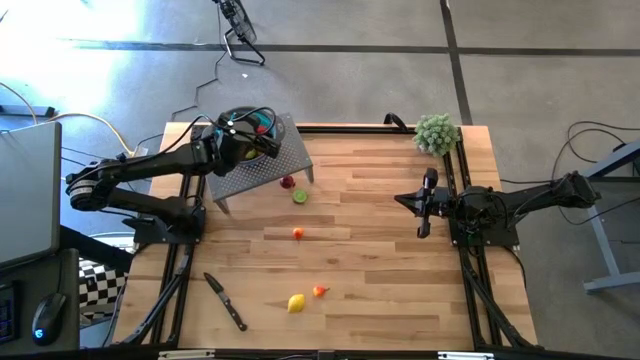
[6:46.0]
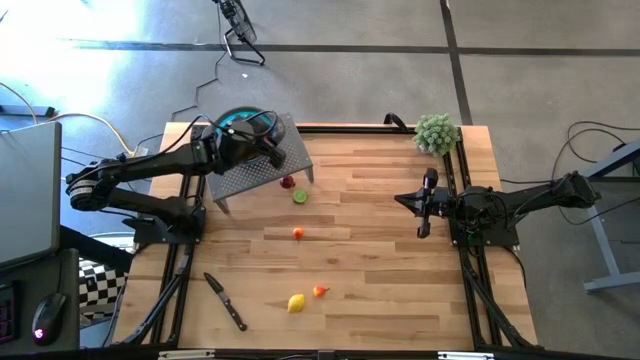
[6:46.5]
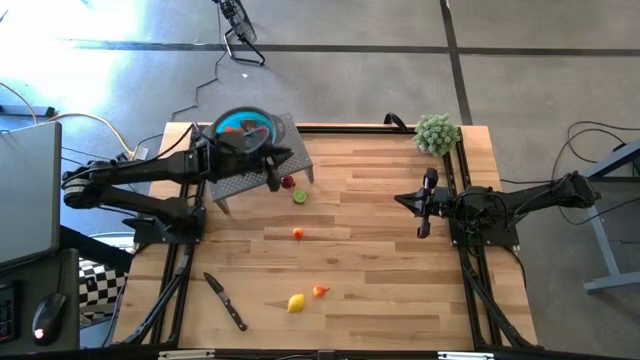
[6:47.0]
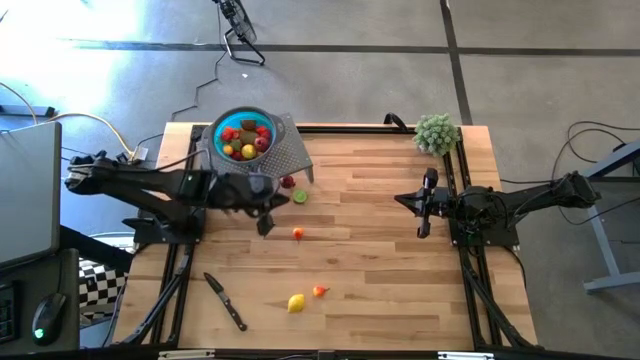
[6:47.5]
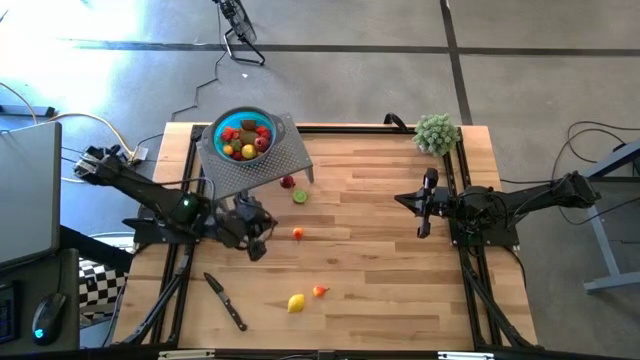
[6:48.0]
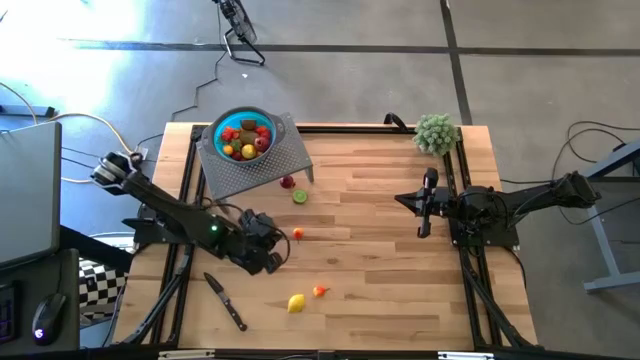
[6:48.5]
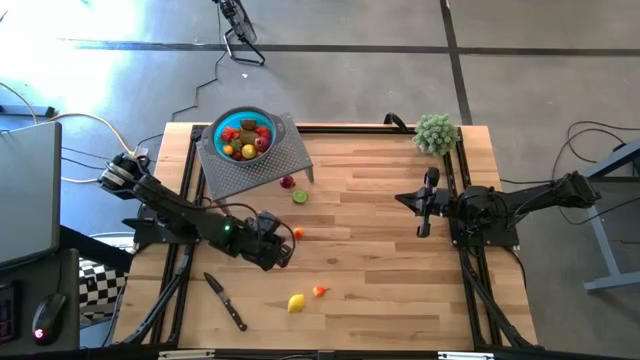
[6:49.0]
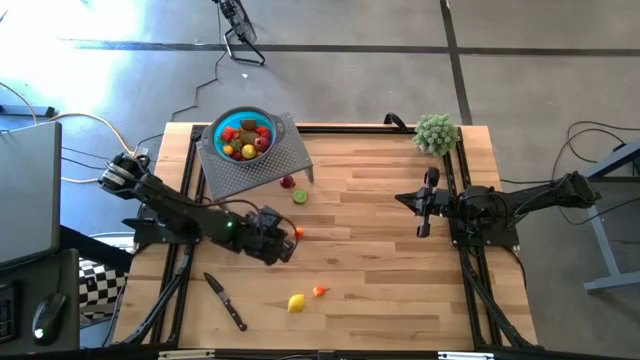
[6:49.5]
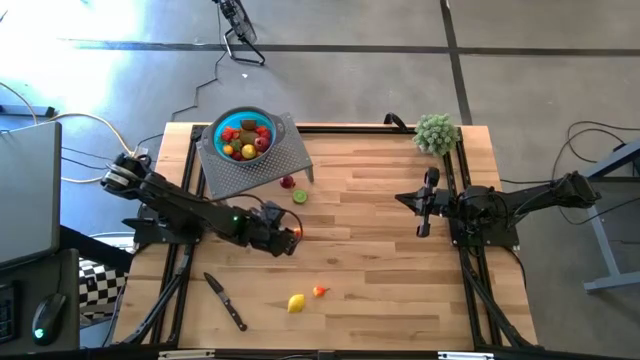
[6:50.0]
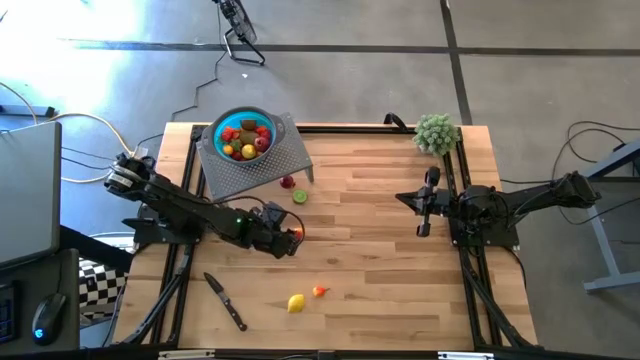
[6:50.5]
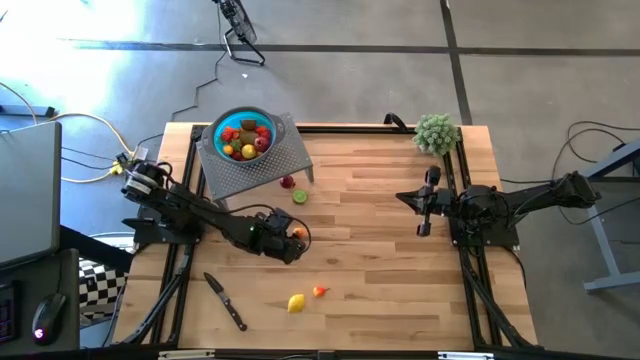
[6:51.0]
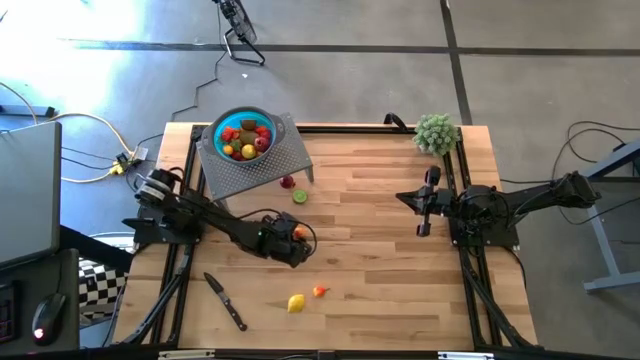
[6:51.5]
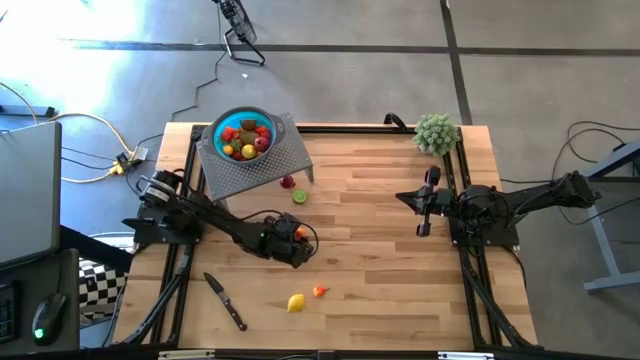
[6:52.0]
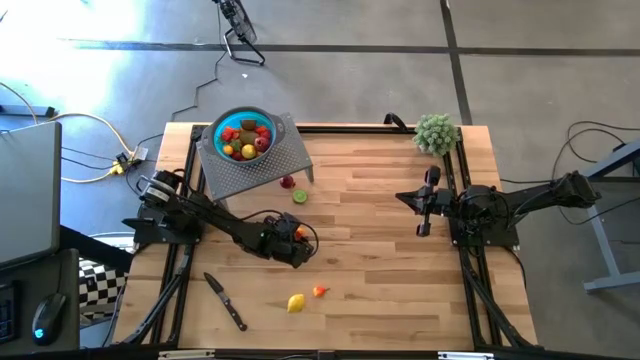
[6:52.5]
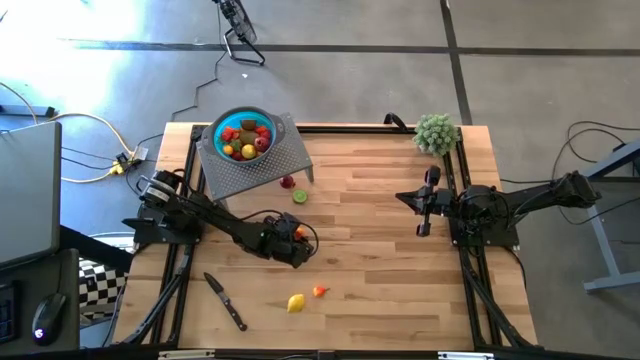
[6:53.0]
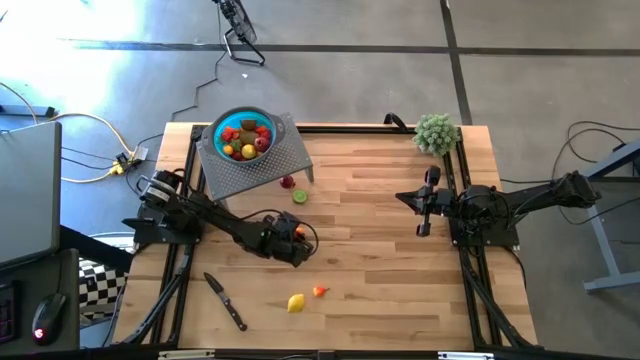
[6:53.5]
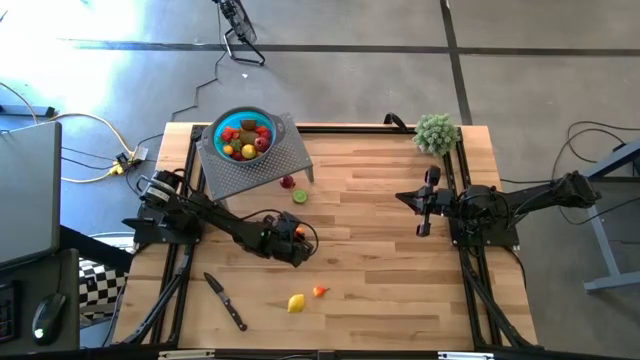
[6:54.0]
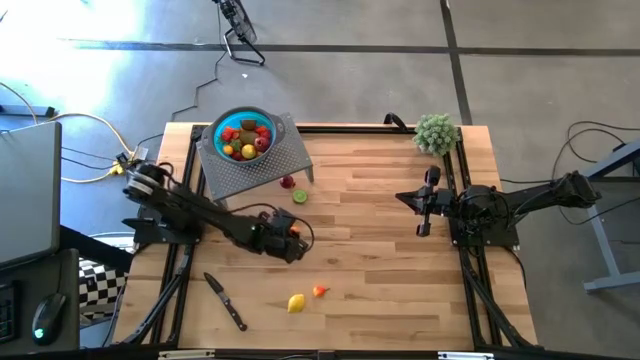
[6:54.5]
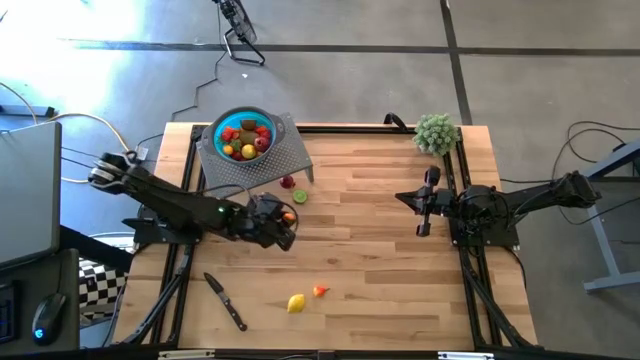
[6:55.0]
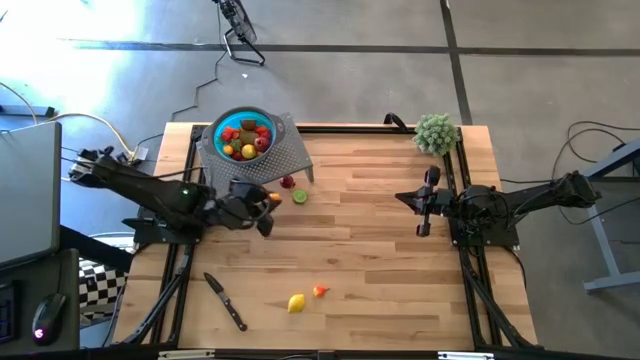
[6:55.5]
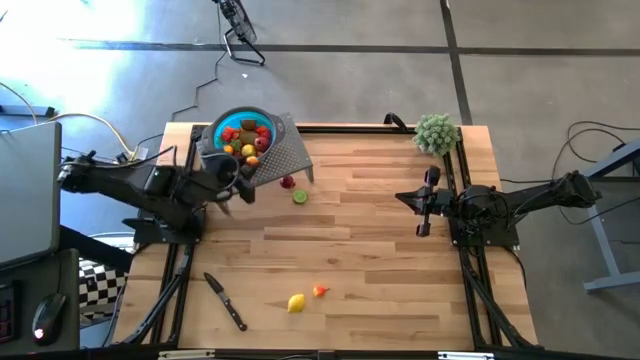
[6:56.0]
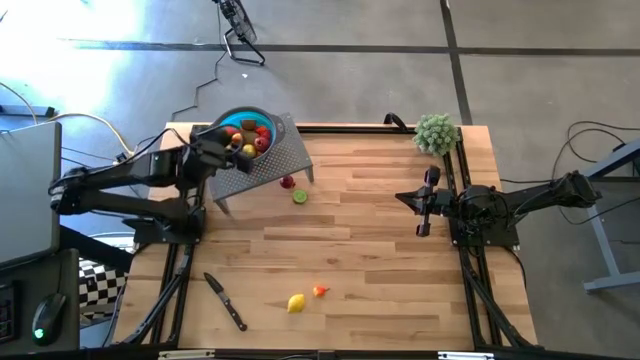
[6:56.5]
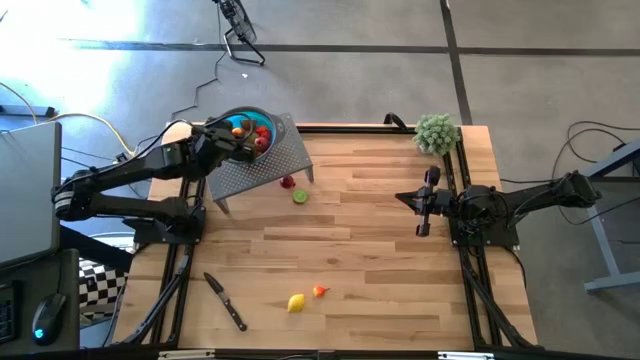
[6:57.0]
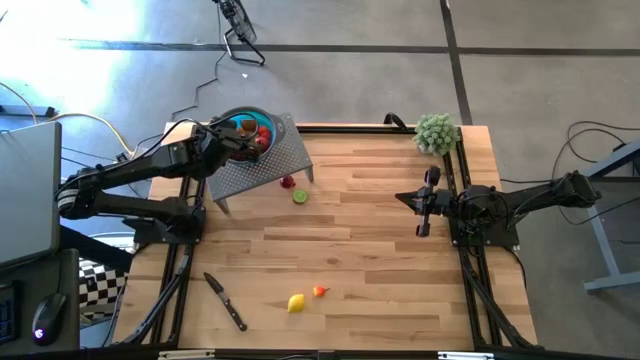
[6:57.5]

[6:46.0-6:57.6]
Task: Pick & Place Fruit
Put the orange pear into the blue strainer bowl on the shelf

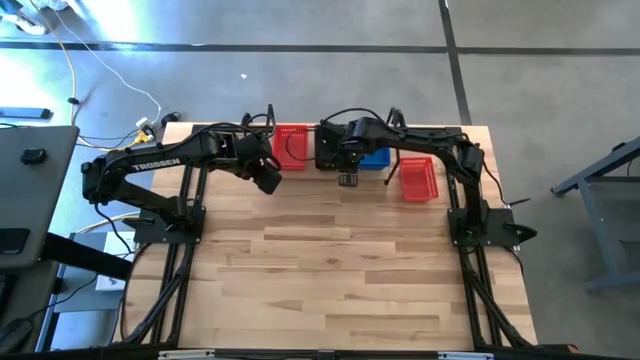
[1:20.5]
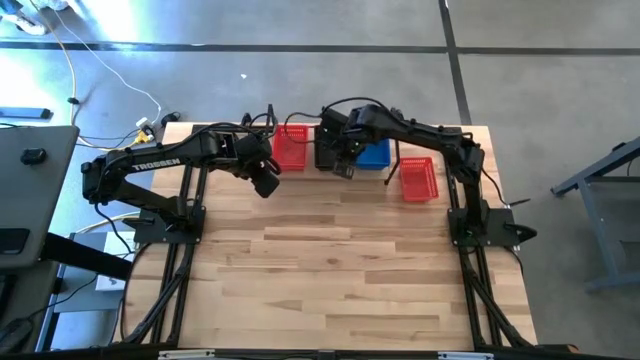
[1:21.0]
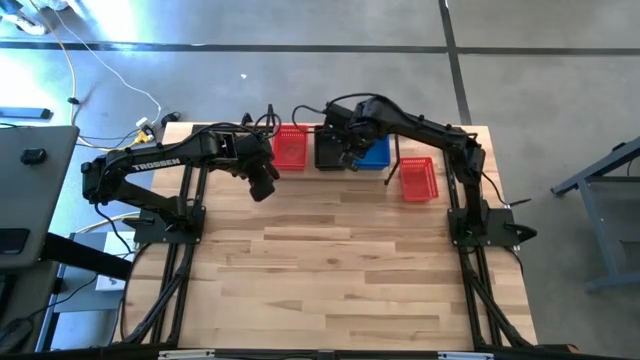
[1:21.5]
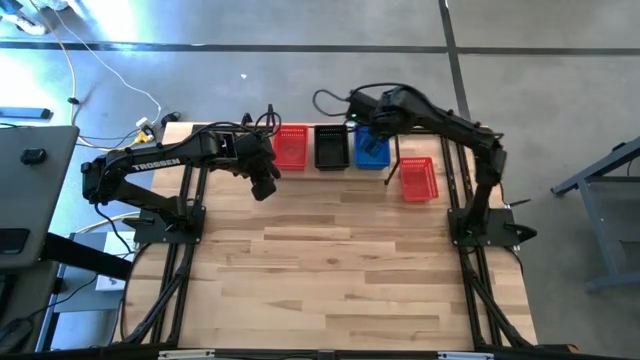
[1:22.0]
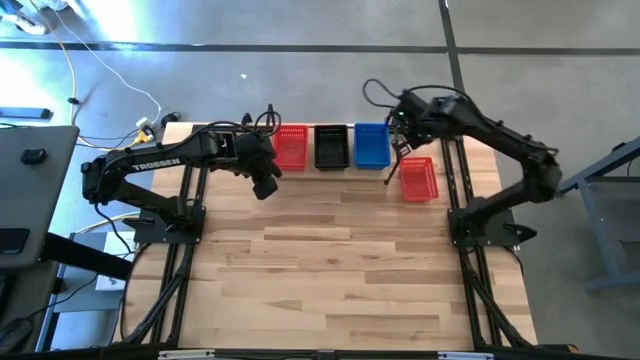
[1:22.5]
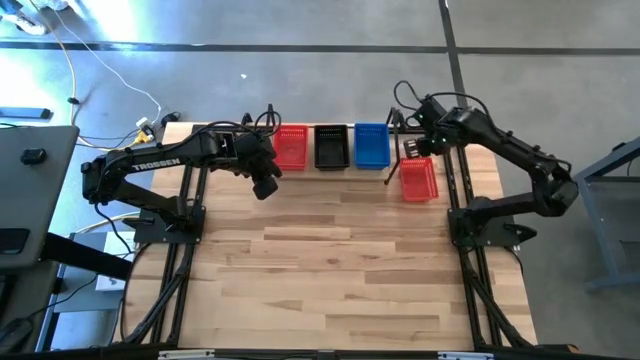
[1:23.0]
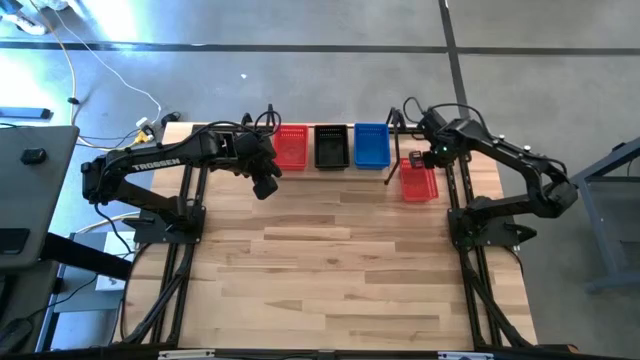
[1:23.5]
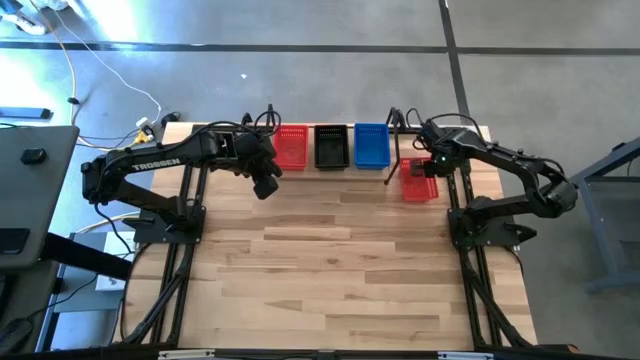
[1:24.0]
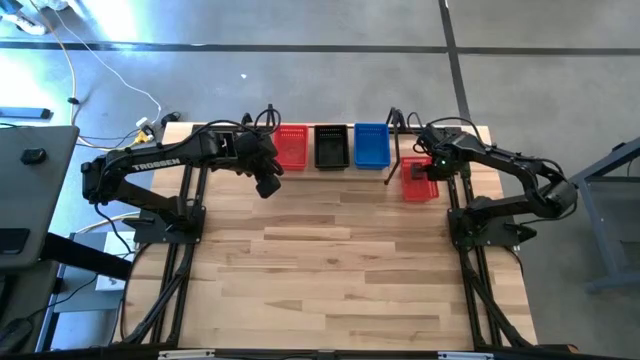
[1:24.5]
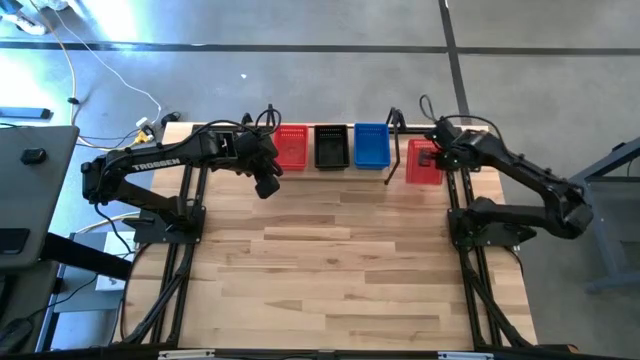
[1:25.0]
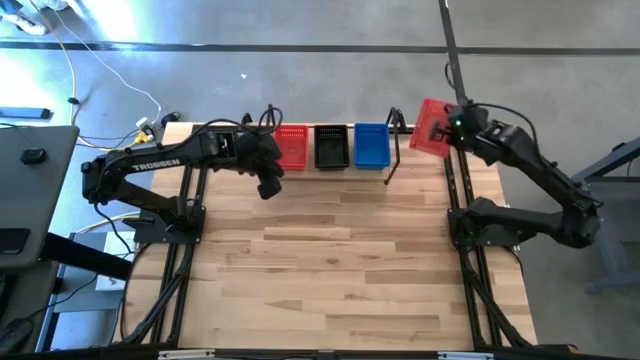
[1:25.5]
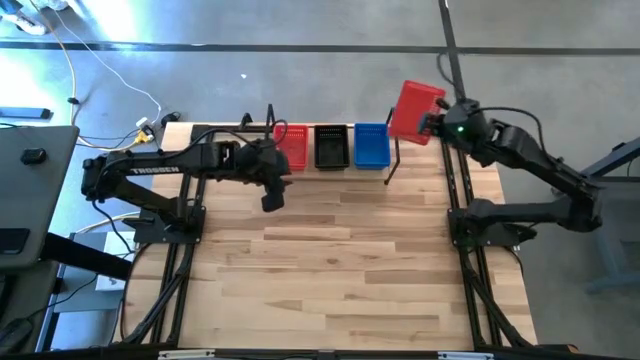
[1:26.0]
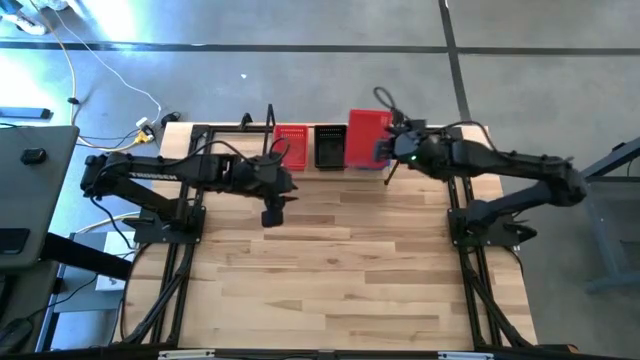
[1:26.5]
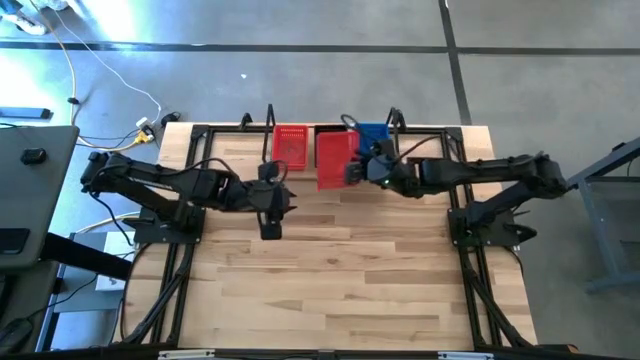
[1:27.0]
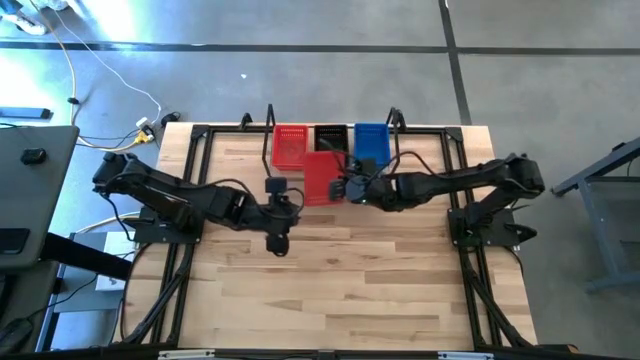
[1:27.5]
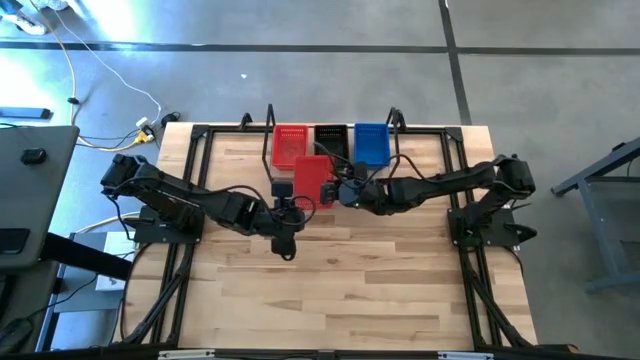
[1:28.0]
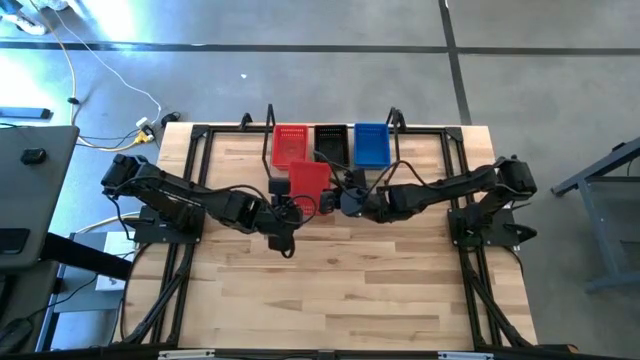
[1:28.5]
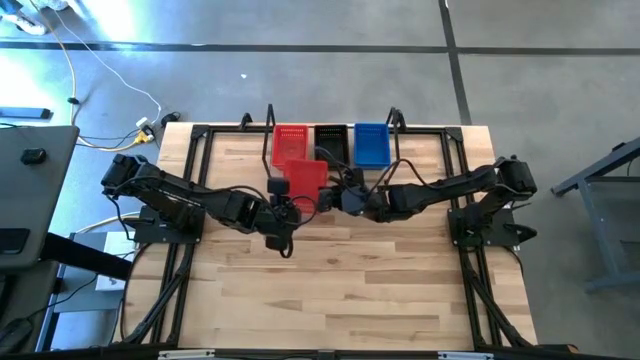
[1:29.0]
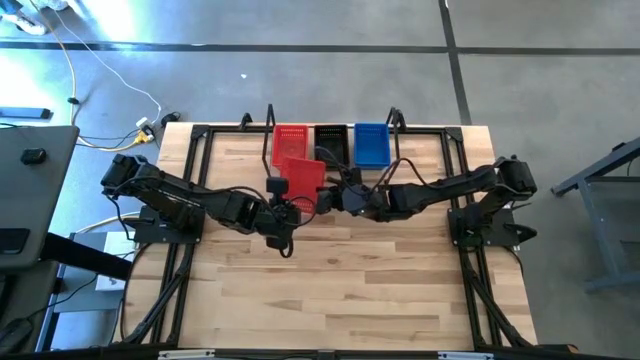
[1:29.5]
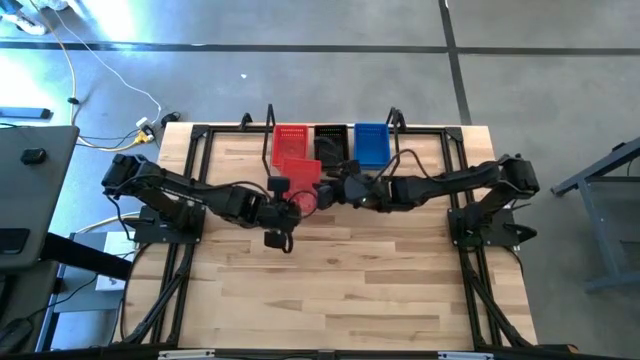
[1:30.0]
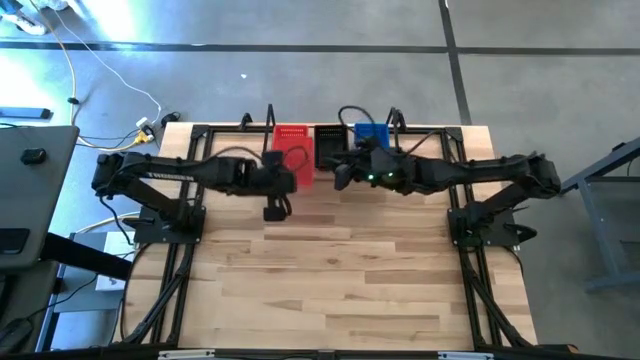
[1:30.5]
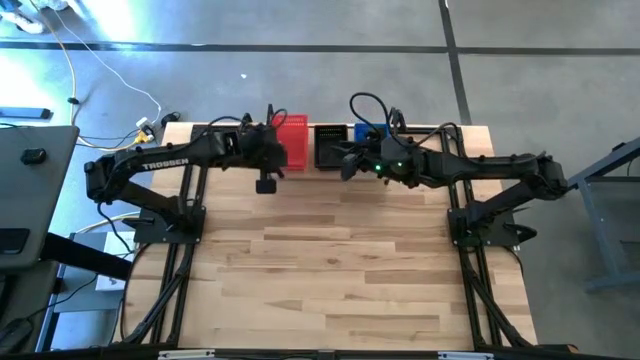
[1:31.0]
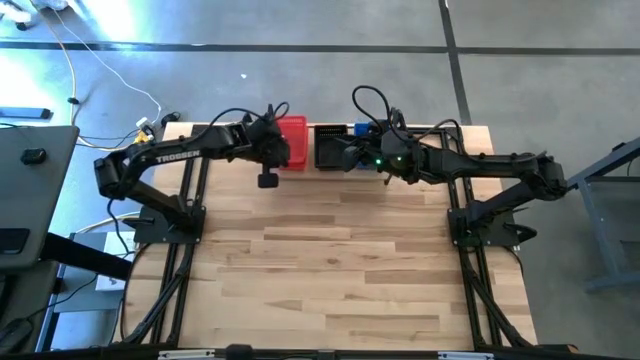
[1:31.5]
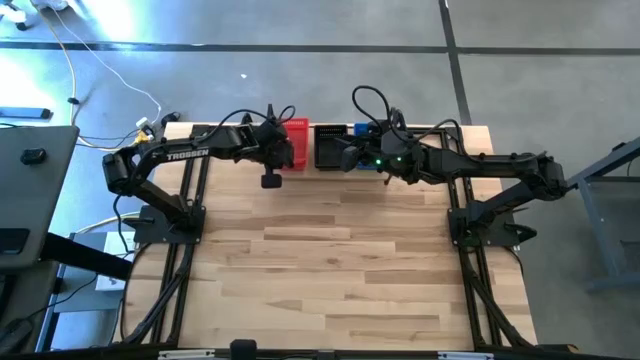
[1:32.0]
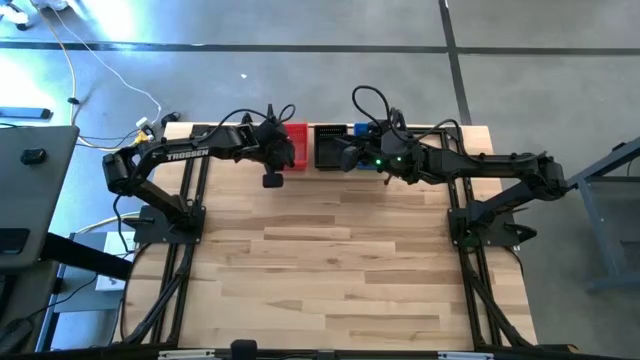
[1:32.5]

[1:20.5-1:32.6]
Task: Stack baskets on shelf by color
Stack the red basket on top of the red basket on the shelf
